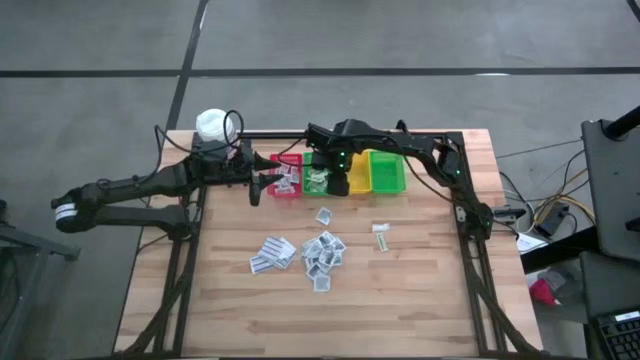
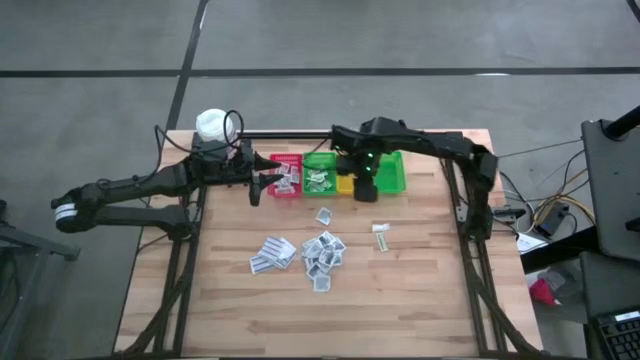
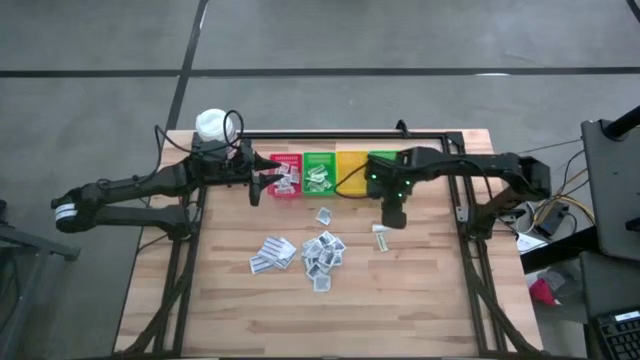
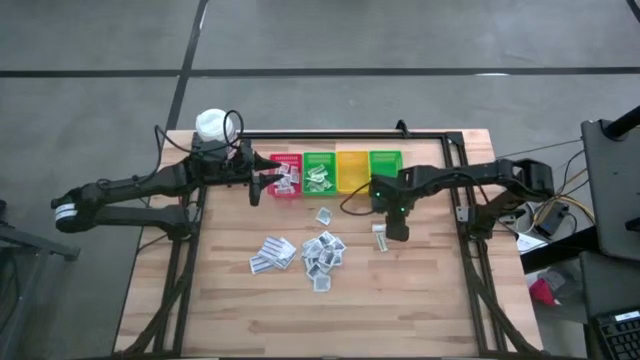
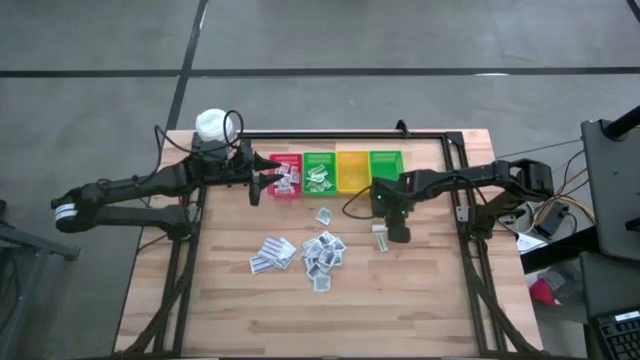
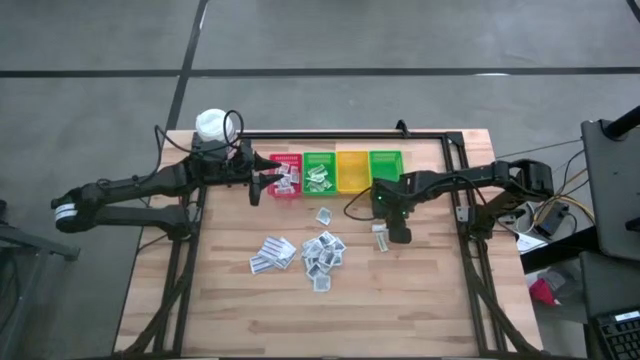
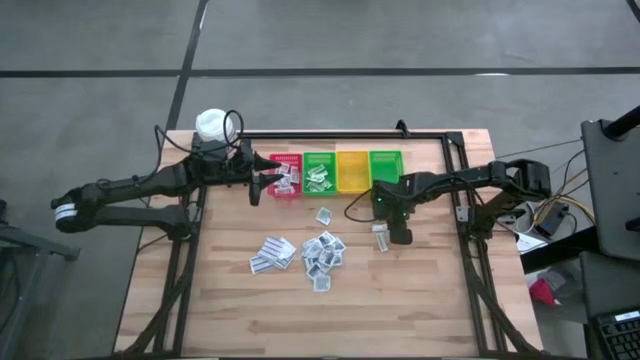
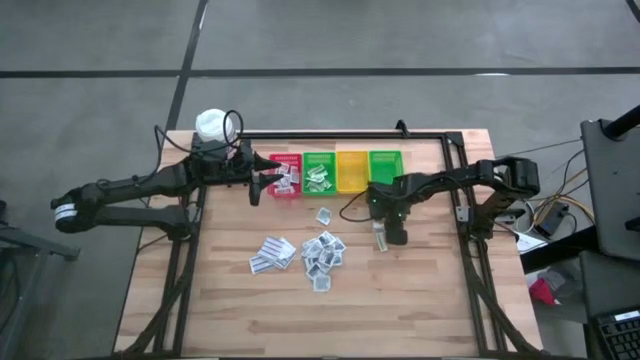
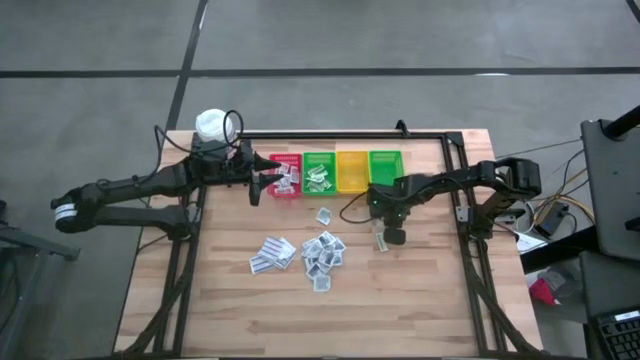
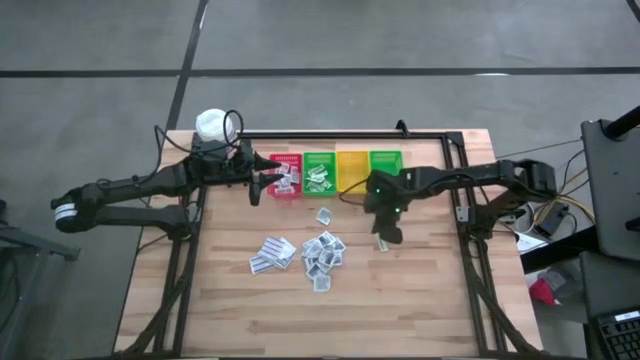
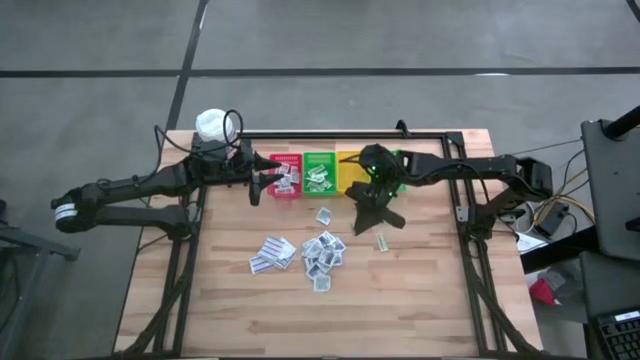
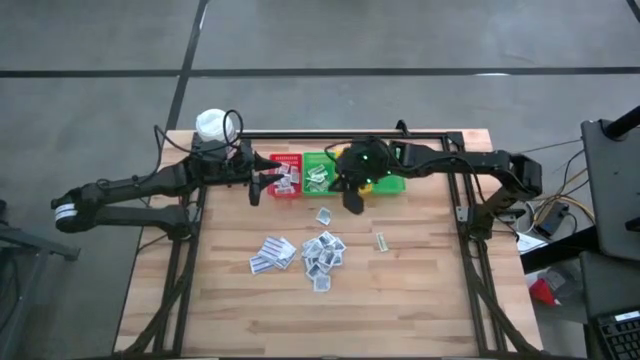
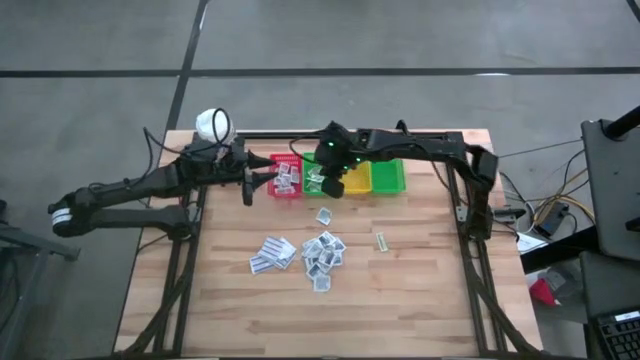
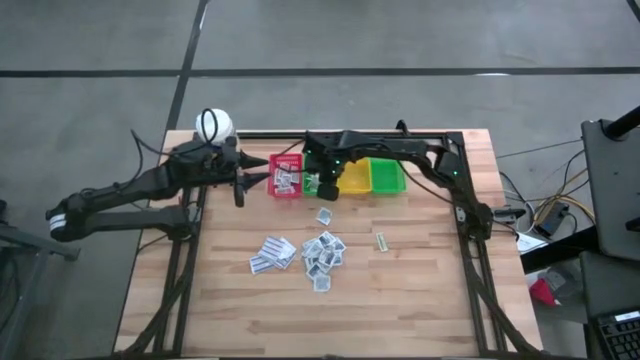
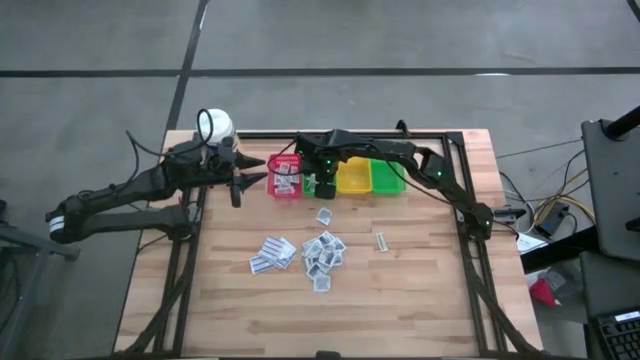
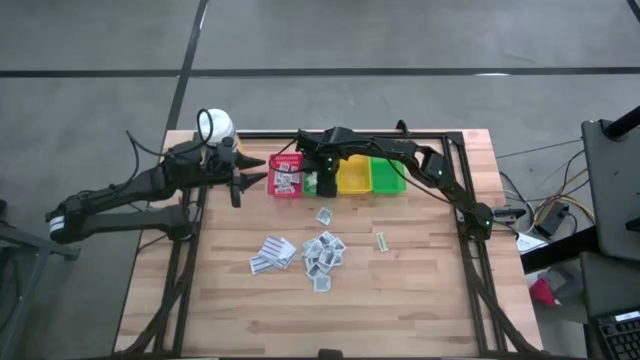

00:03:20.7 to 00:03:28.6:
Task: Pick & Place First Aid Supplies
Put the green bandage into the left green bin

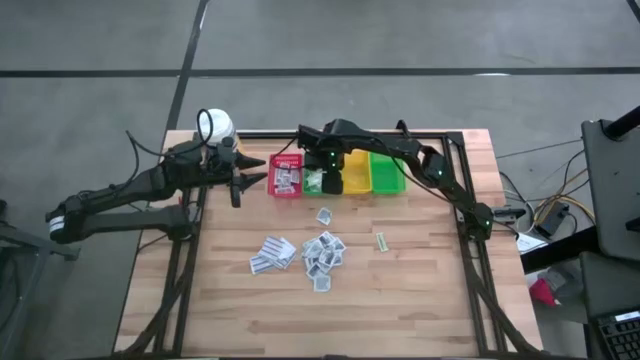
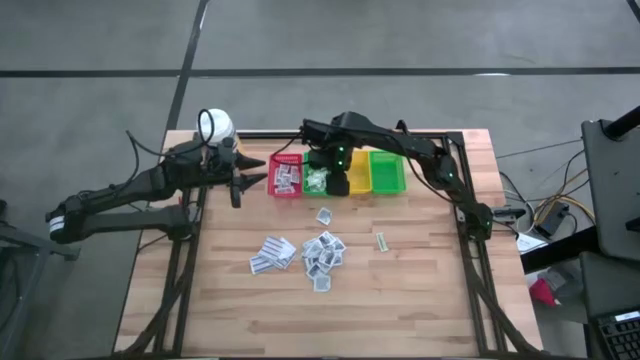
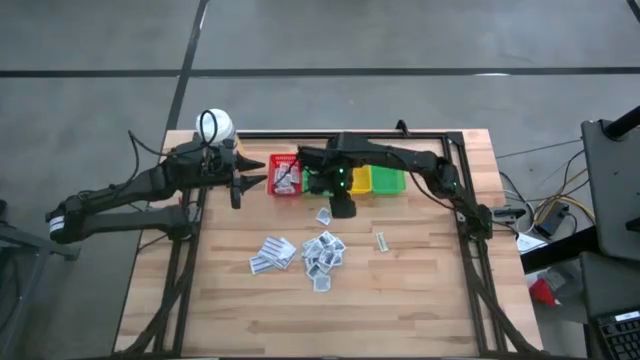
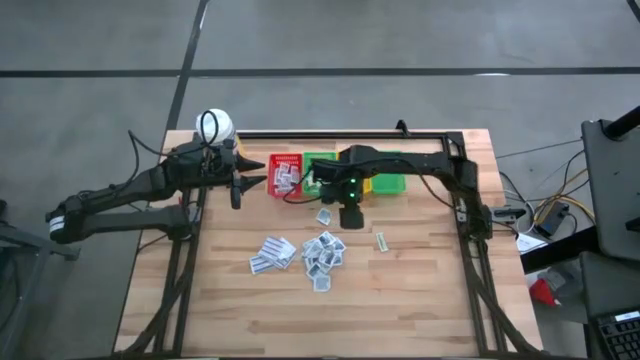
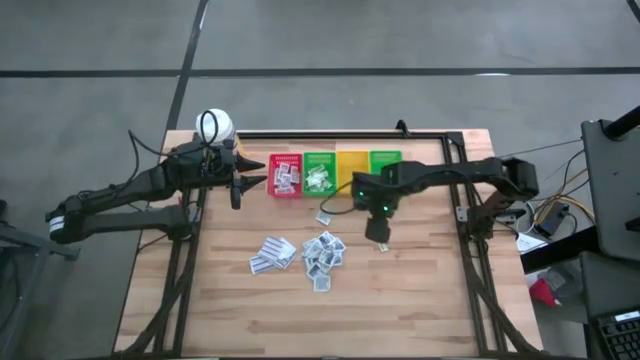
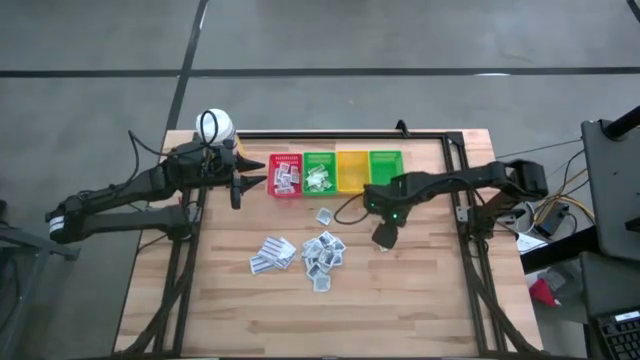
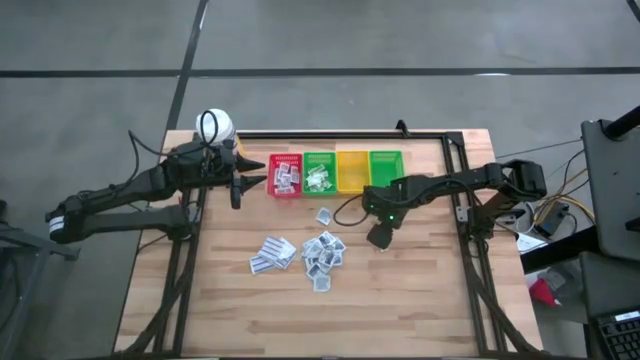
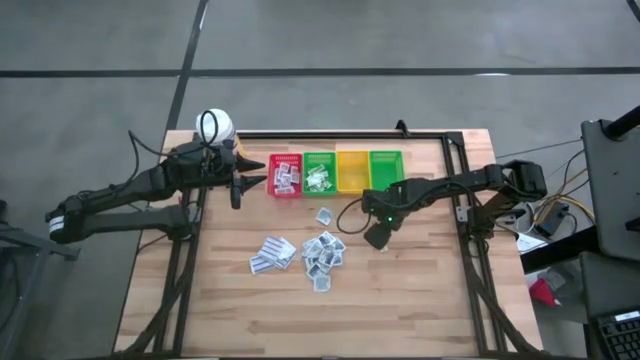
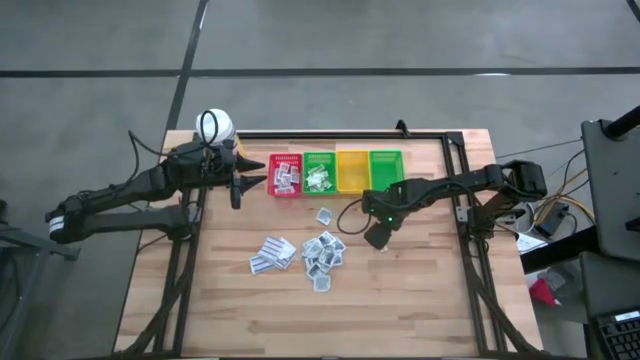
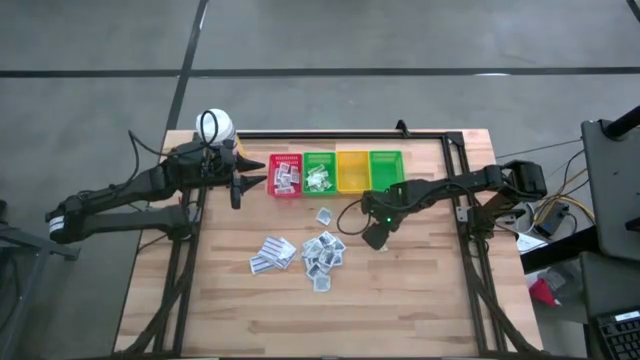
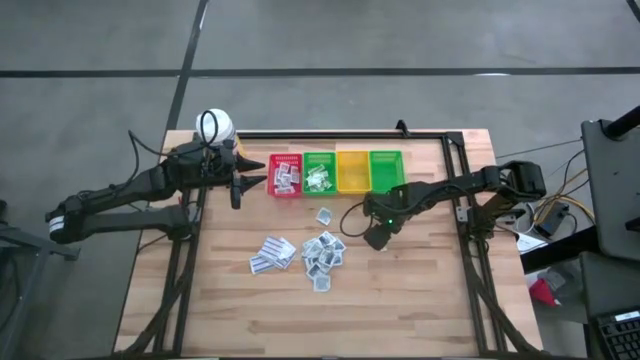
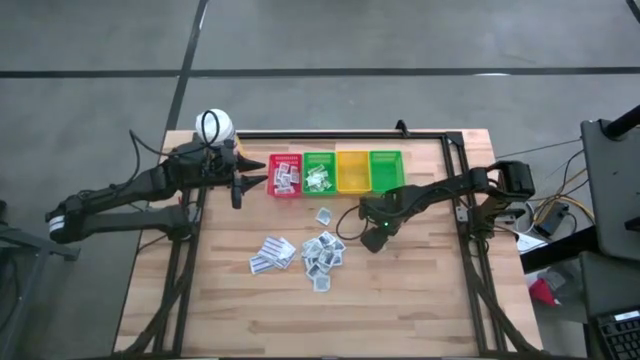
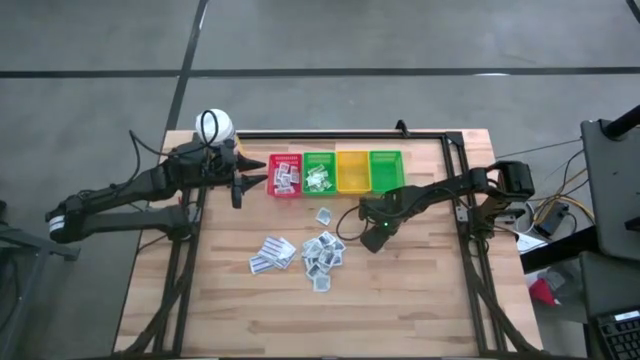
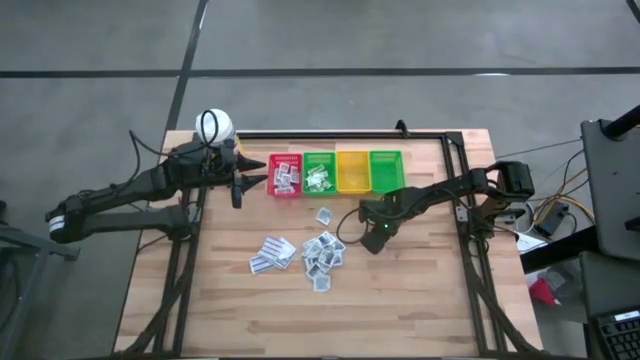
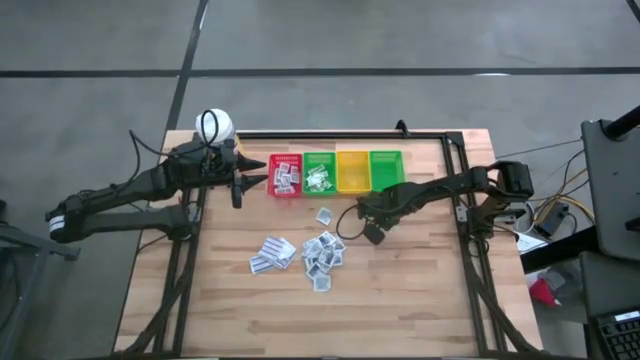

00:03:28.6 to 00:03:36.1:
Put the green bandage into the left green bin

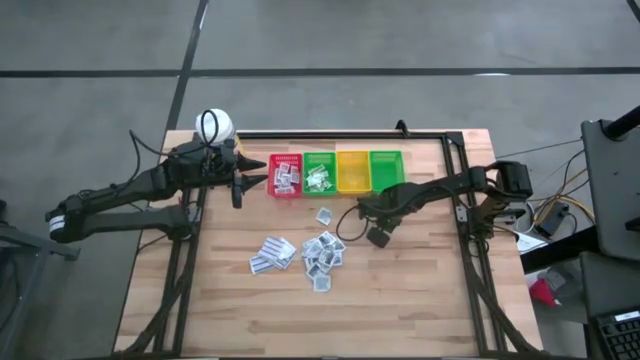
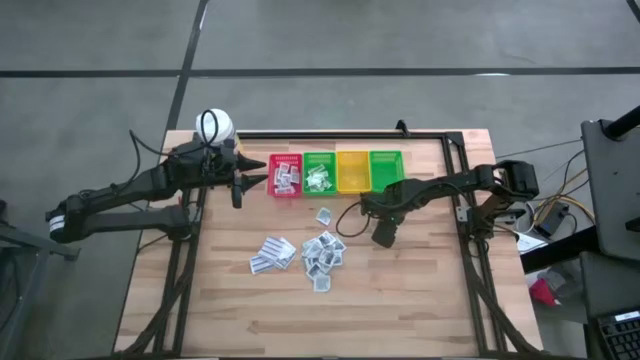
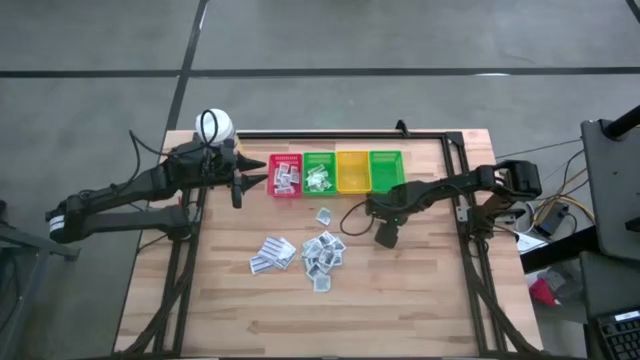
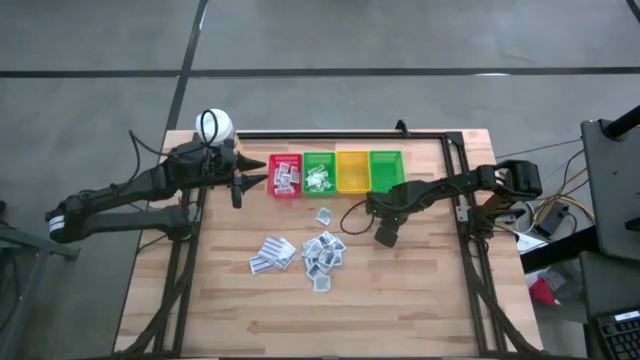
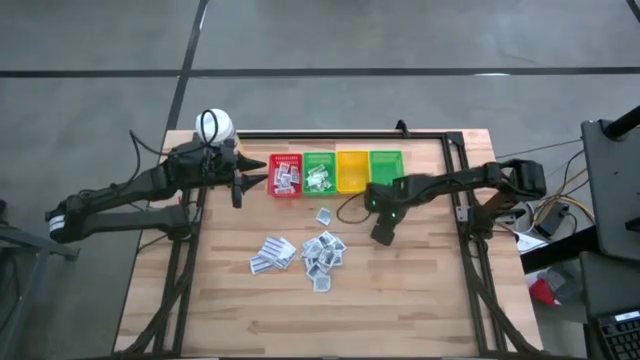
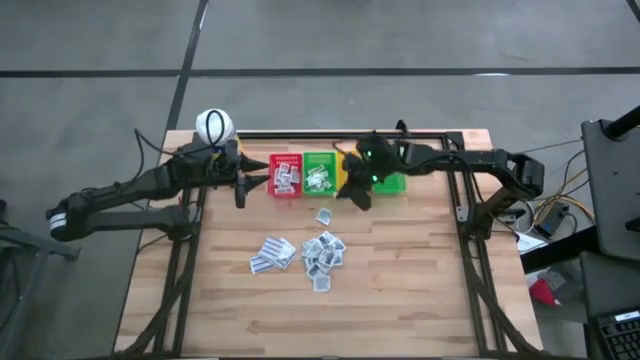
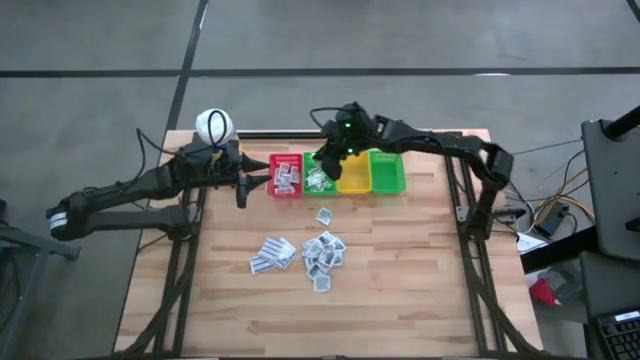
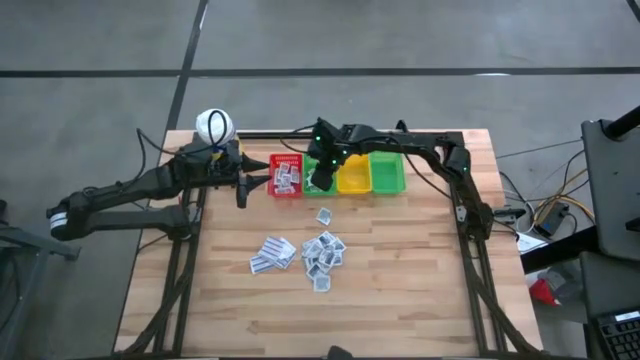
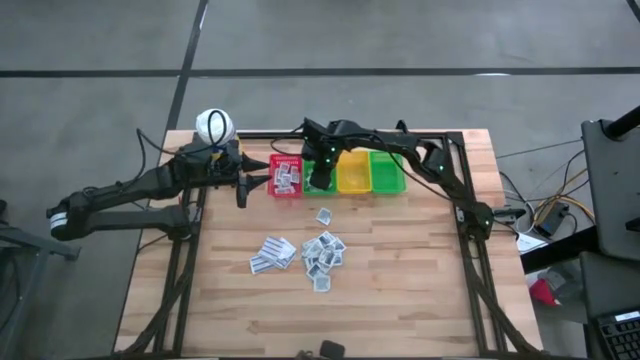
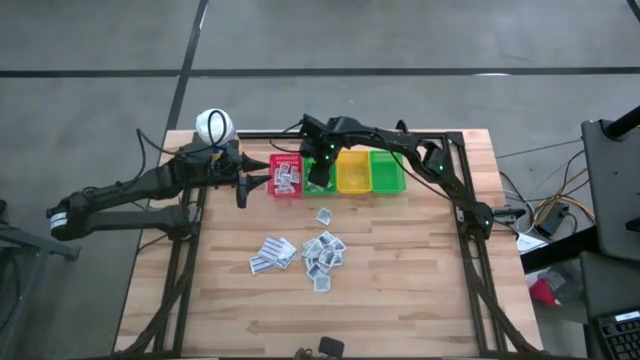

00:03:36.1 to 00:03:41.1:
Put the green bandage into the left green bin
